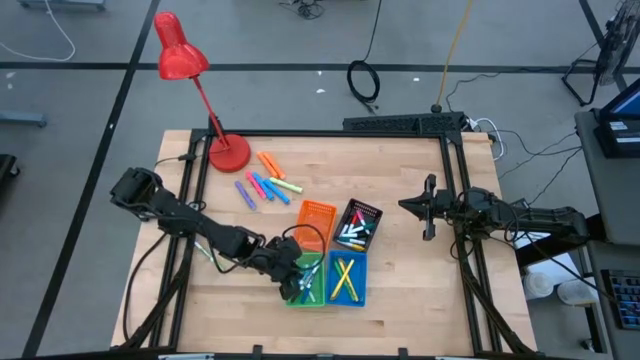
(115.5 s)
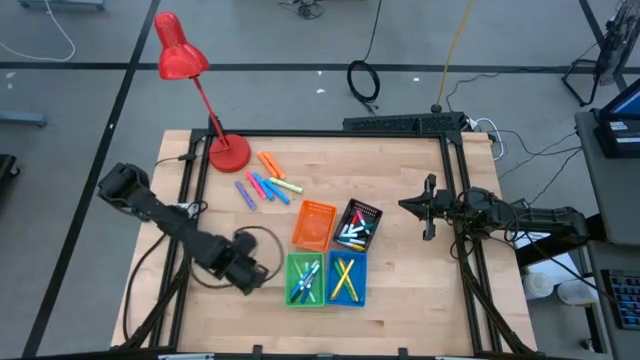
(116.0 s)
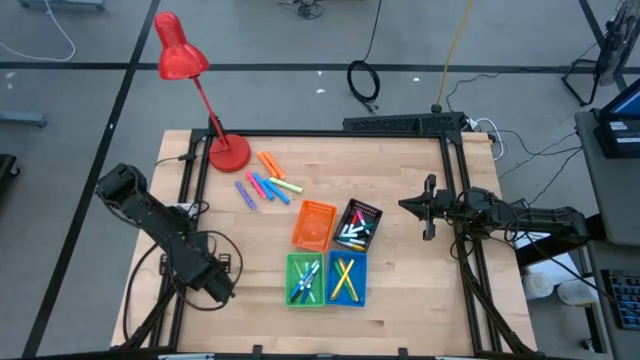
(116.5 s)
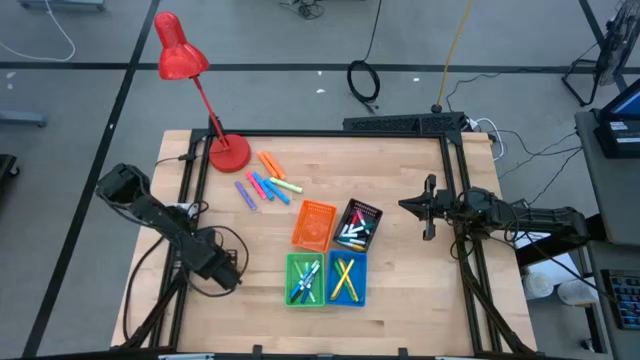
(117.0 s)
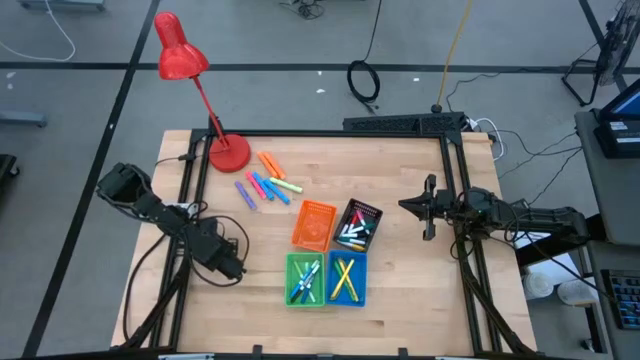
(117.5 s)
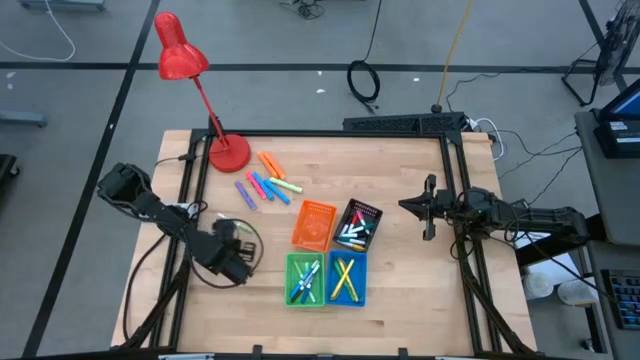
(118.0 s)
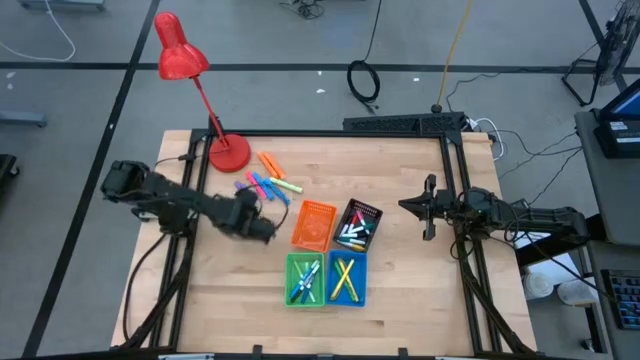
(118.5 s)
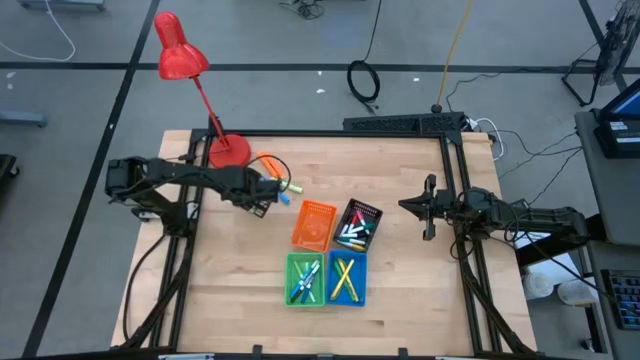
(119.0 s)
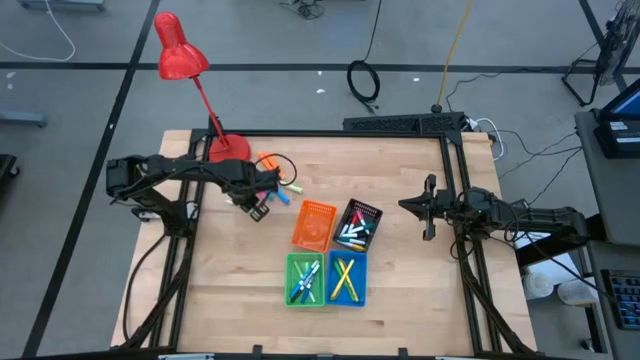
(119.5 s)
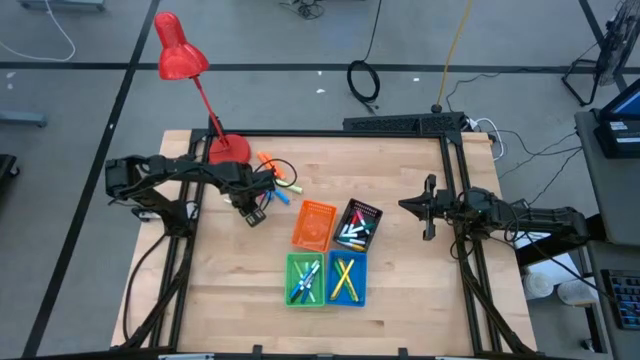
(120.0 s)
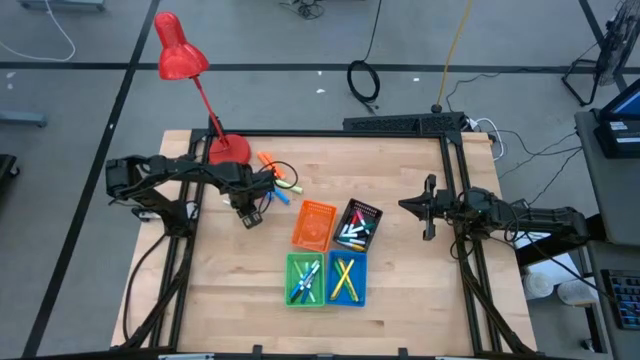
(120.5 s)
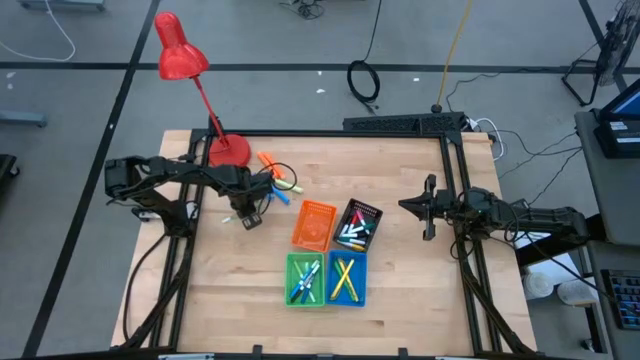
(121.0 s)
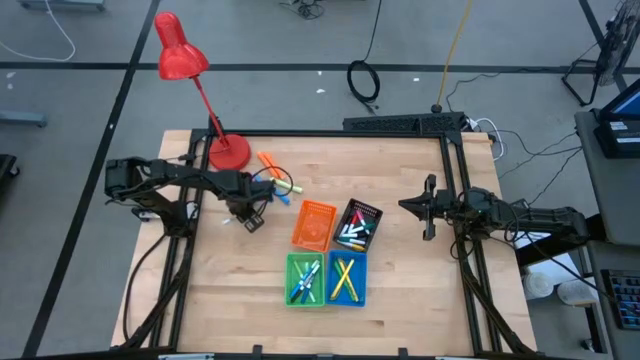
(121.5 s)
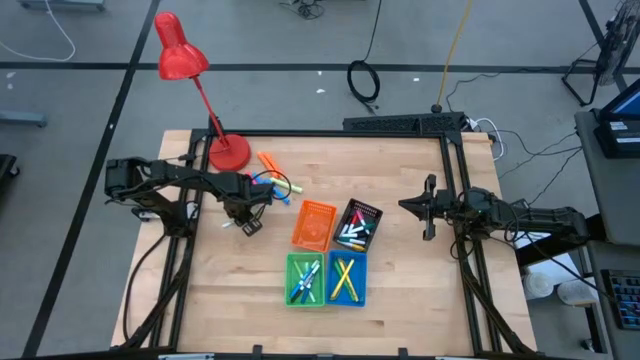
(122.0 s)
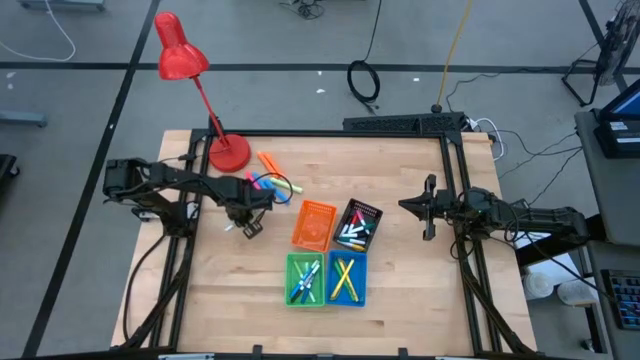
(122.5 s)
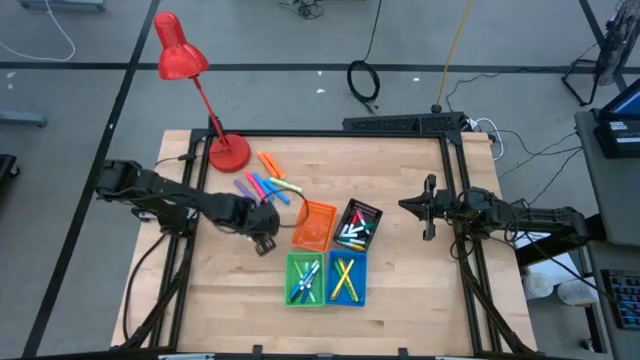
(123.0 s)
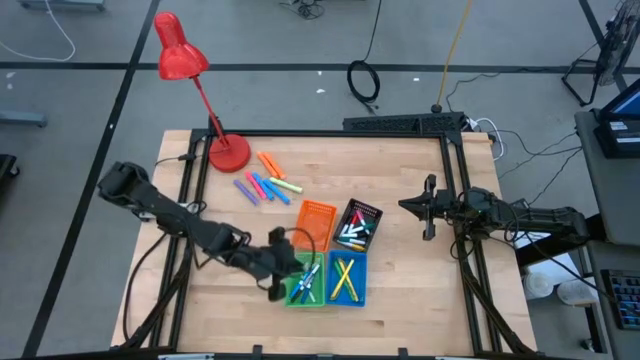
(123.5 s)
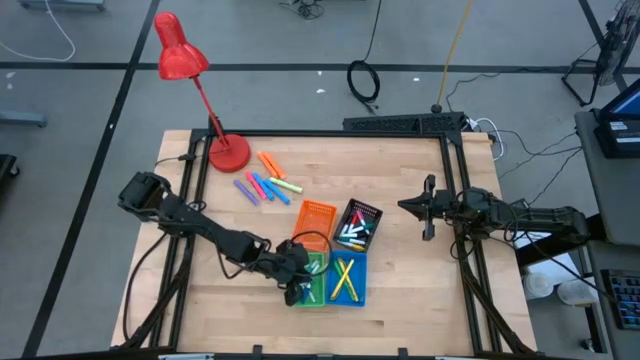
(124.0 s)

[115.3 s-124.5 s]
Task: Pick & Place Markers
Put the green marker pen into the green basket

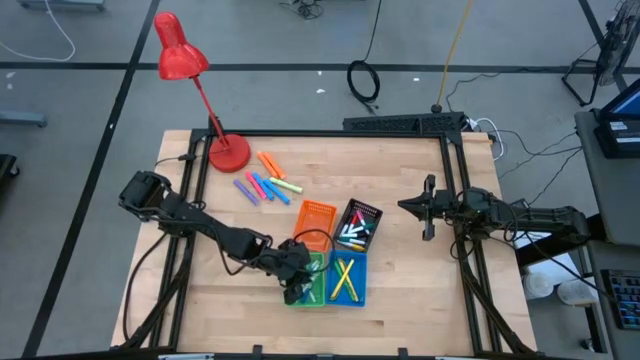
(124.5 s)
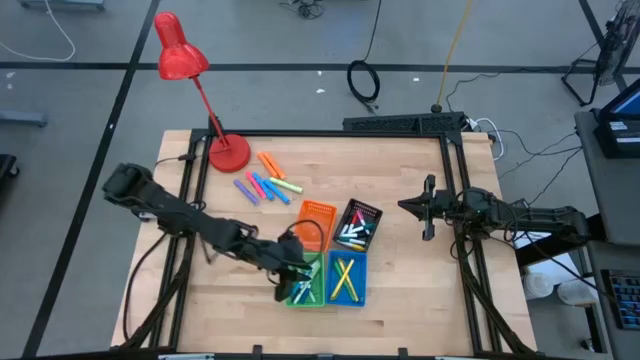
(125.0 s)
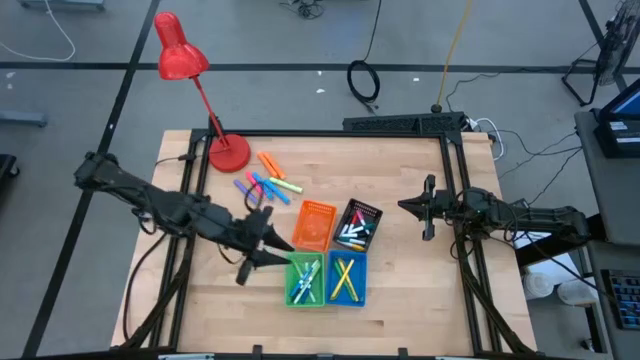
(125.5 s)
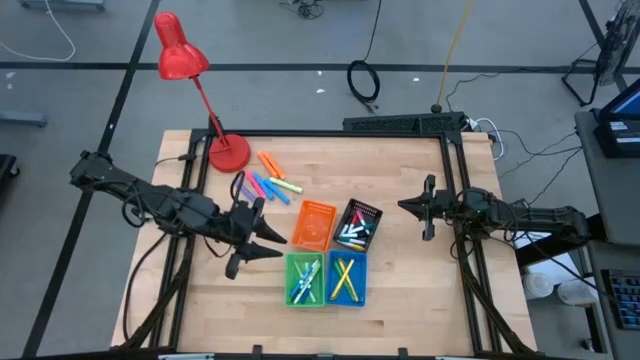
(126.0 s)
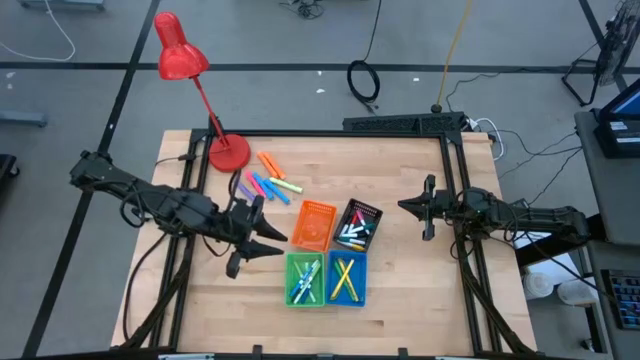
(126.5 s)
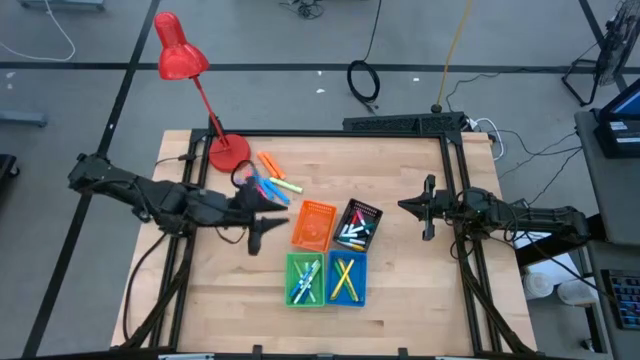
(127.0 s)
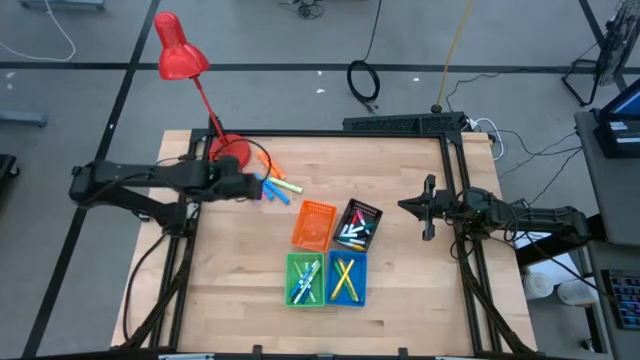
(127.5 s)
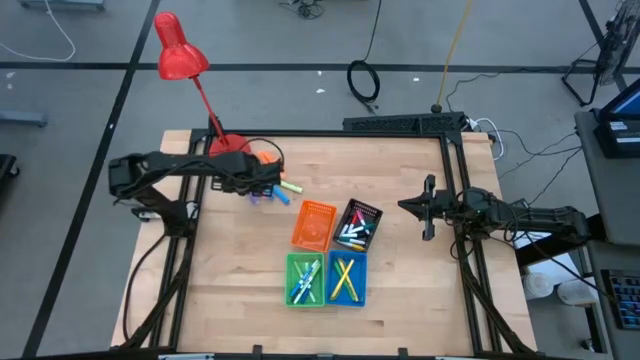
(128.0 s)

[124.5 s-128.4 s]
Put the purple highlighter pen into the orange basket

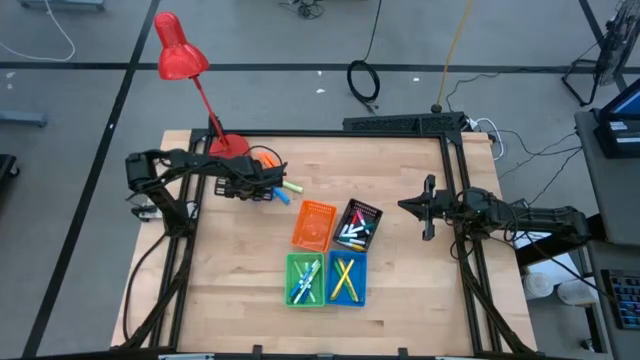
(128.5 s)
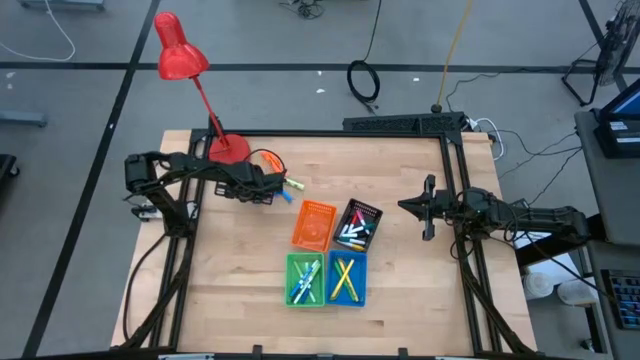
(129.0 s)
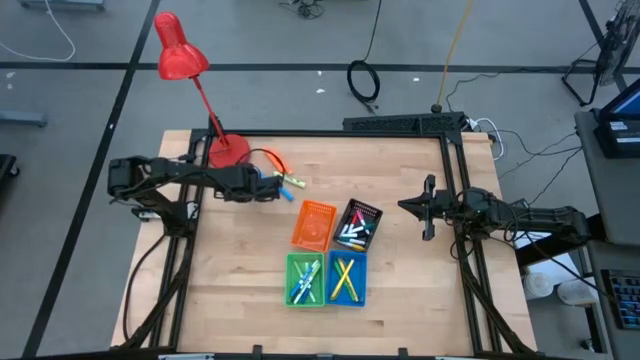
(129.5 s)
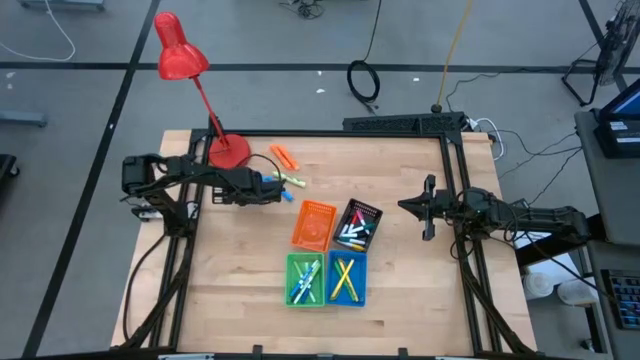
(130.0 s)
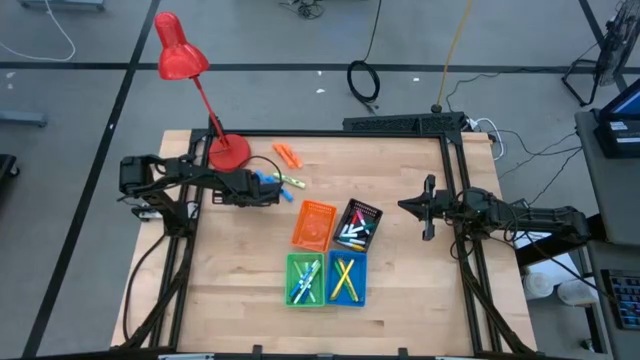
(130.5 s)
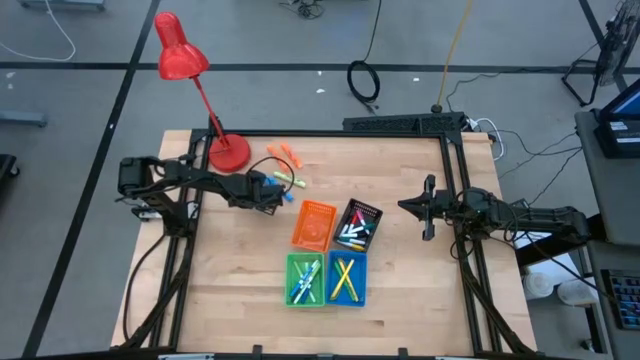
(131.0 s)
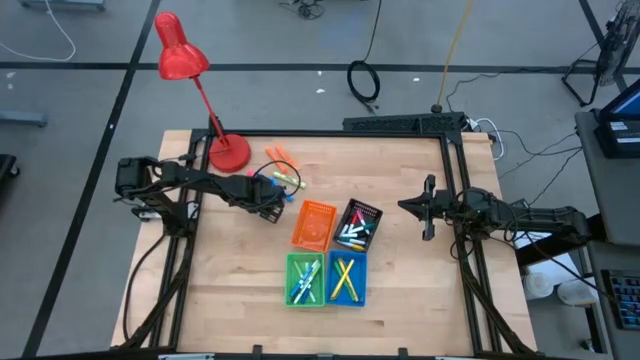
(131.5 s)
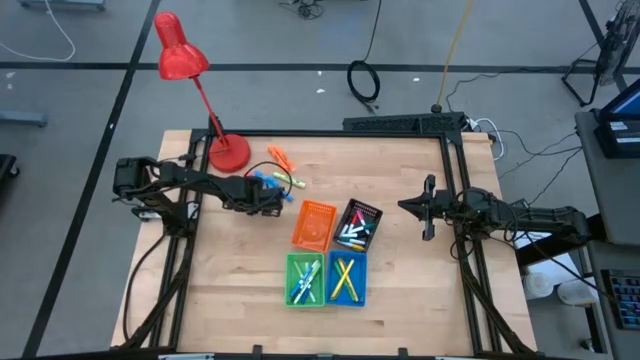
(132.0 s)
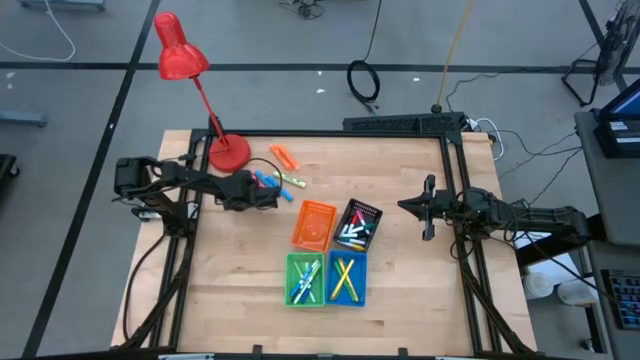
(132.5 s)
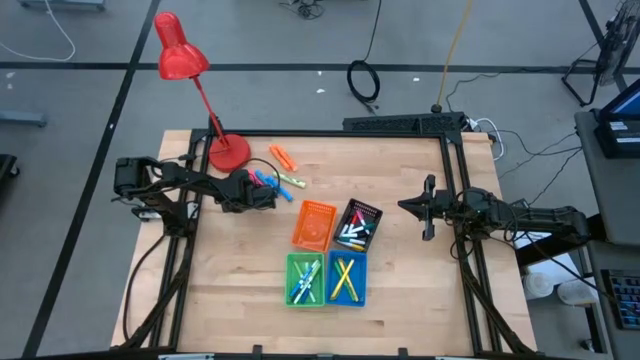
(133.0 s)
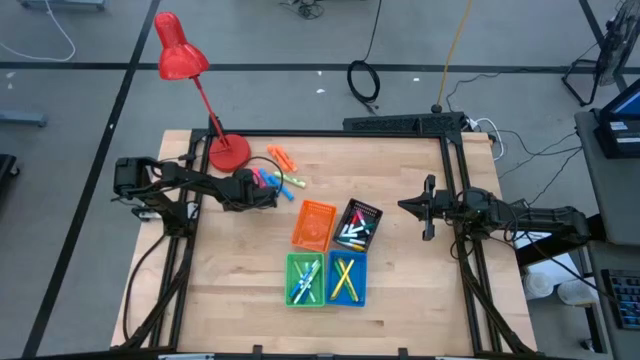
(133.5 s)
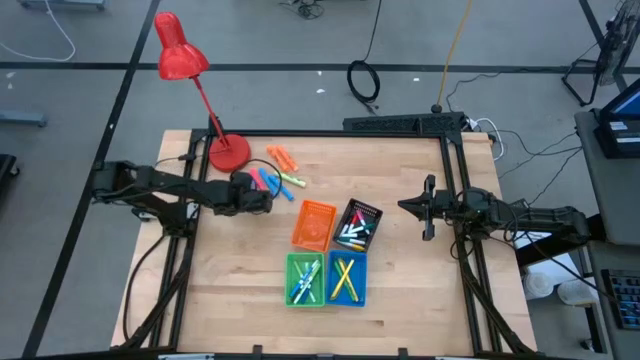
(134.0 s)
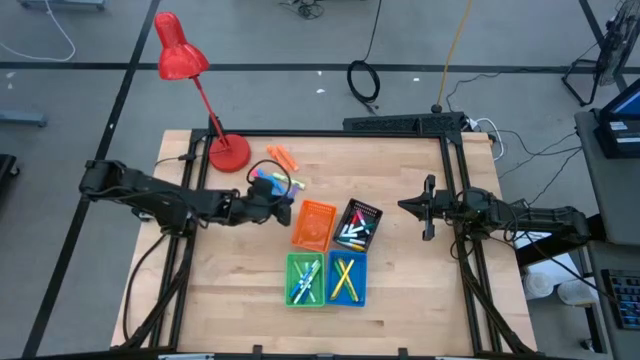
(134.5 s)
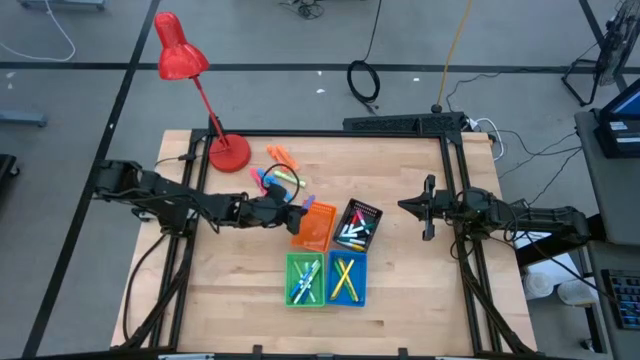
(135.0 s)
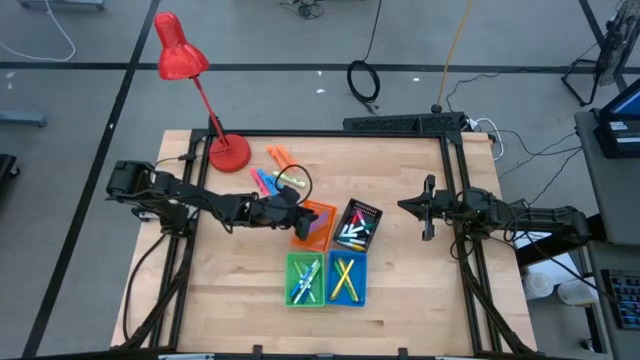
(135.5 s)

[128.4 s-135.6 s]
Put the purple highlighter pen into the orange basket

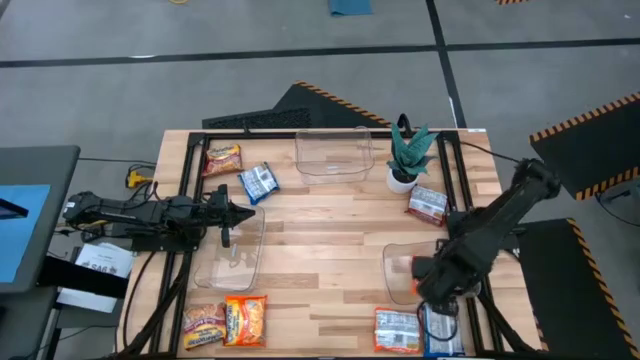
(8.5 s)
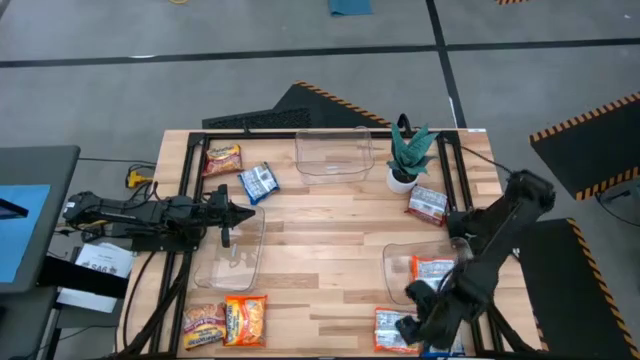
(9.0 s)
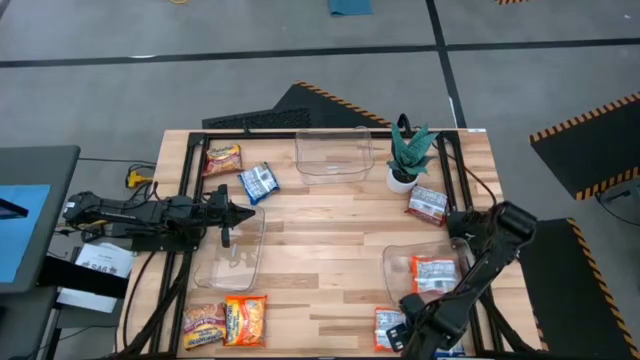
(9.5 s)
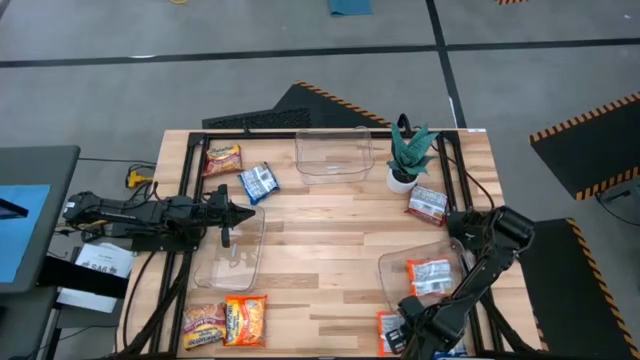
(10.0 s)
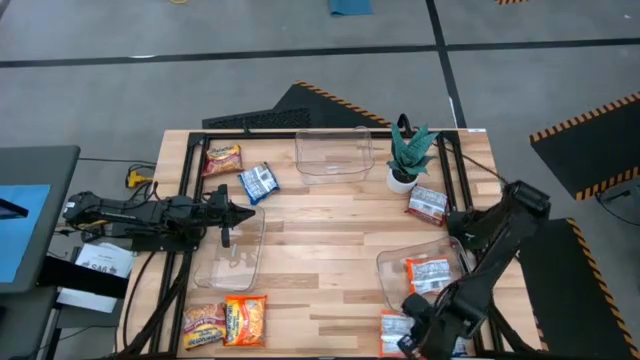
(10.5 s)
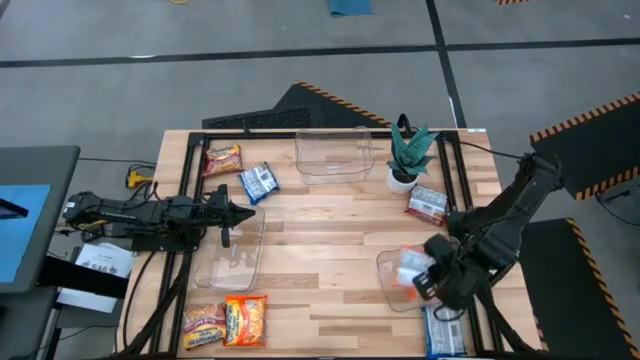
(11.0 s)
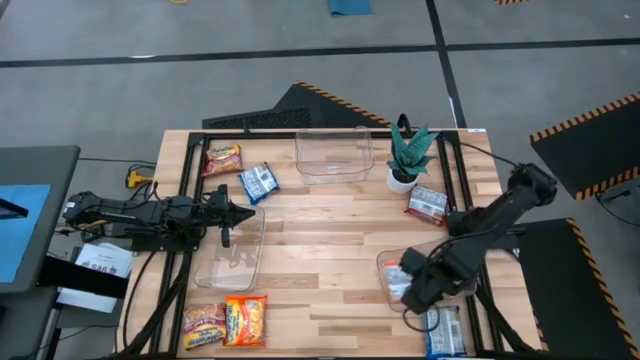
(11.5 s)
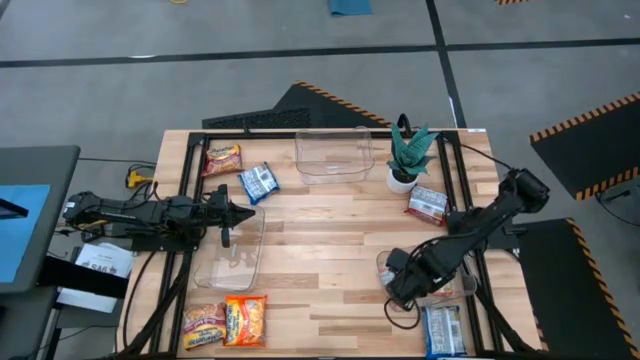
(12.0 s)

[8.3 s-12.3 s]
Task: Sort Maruchan noodles
Put the right orange noodle pack into the bottom right transparent bin
